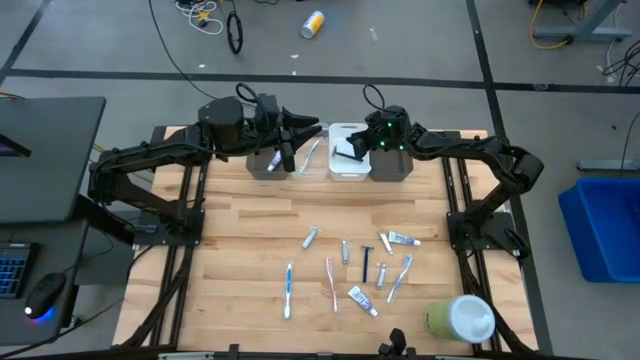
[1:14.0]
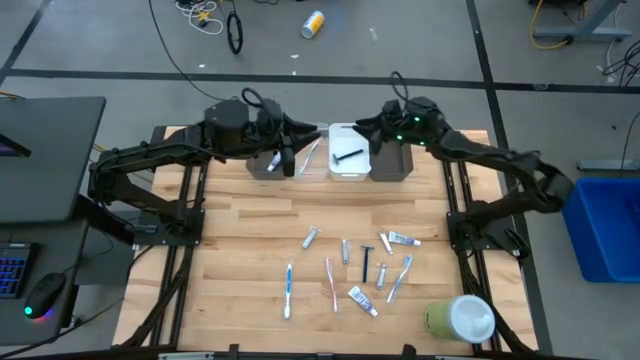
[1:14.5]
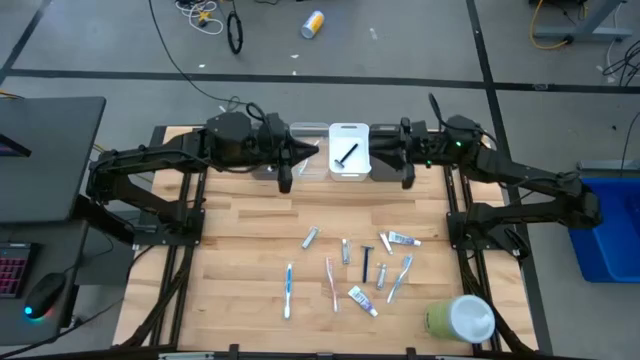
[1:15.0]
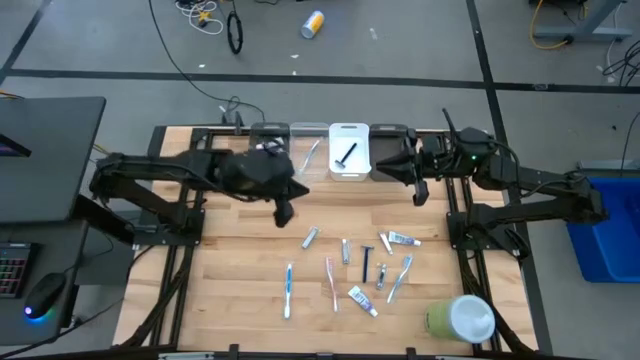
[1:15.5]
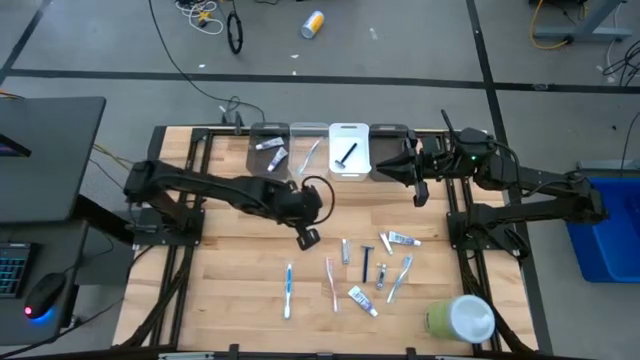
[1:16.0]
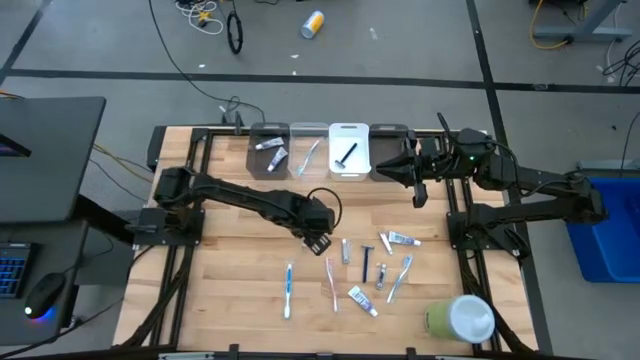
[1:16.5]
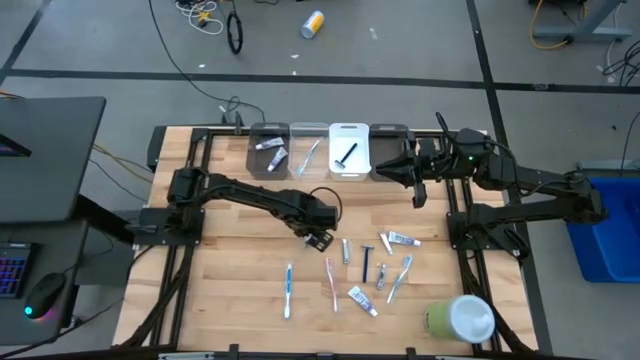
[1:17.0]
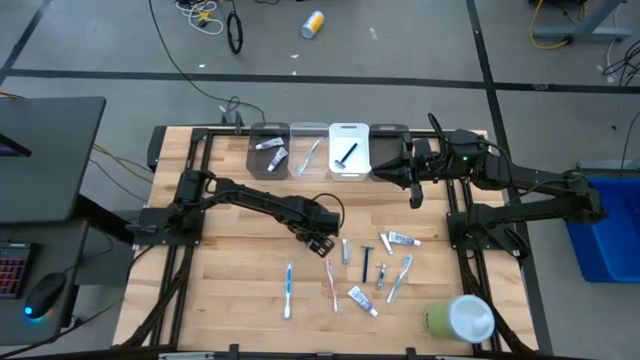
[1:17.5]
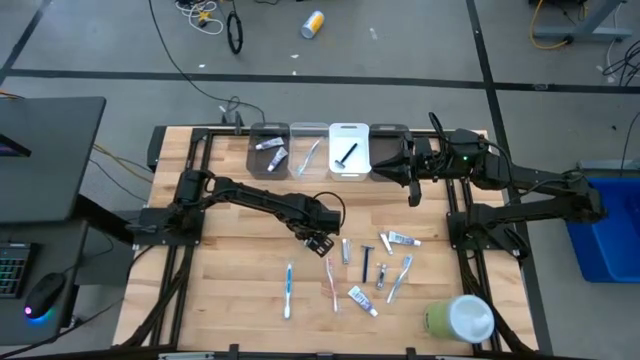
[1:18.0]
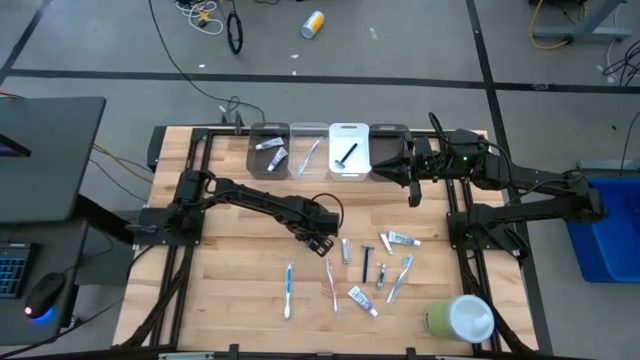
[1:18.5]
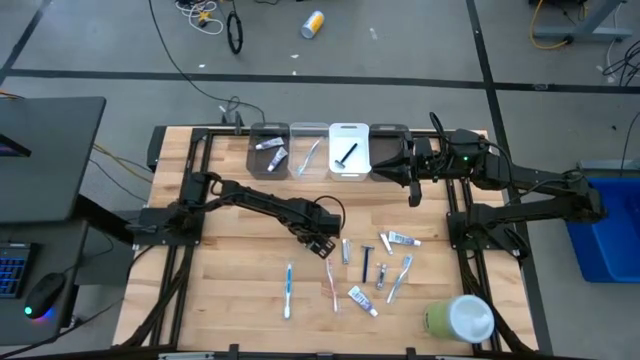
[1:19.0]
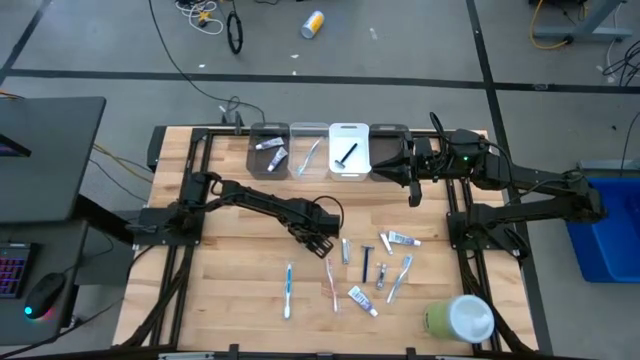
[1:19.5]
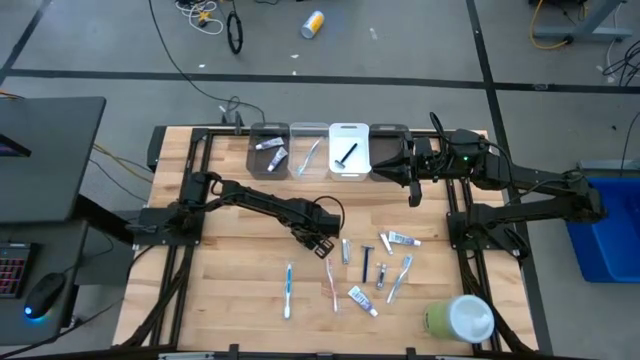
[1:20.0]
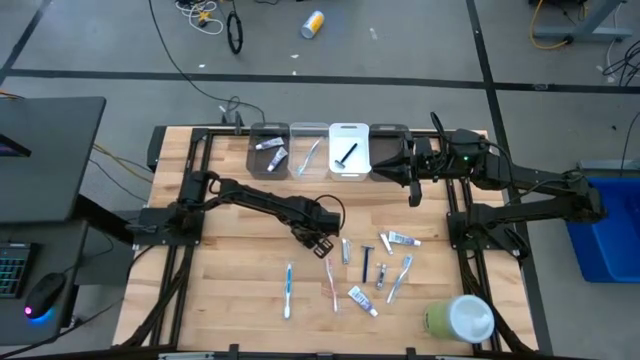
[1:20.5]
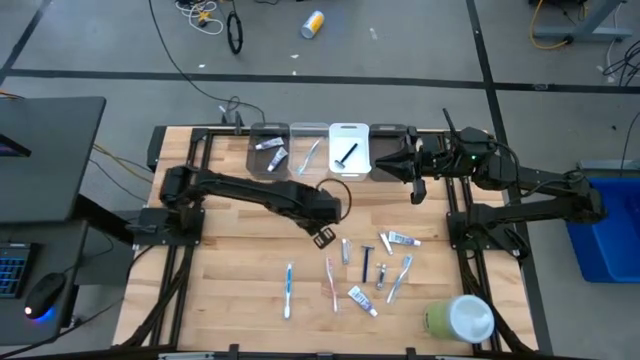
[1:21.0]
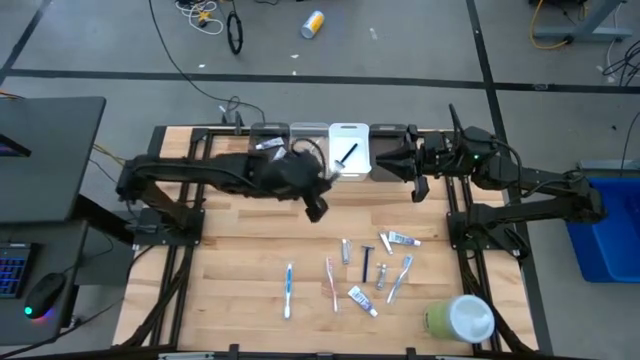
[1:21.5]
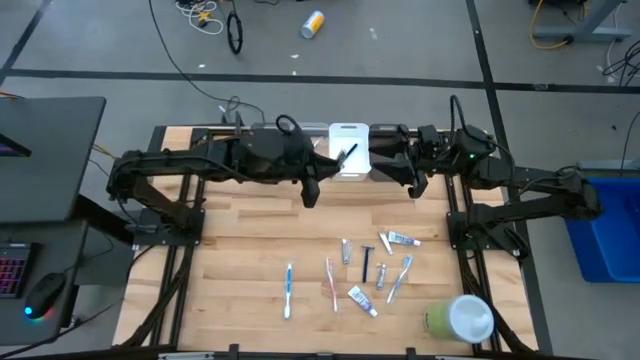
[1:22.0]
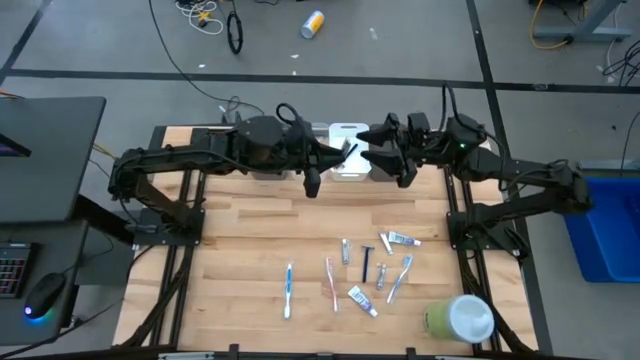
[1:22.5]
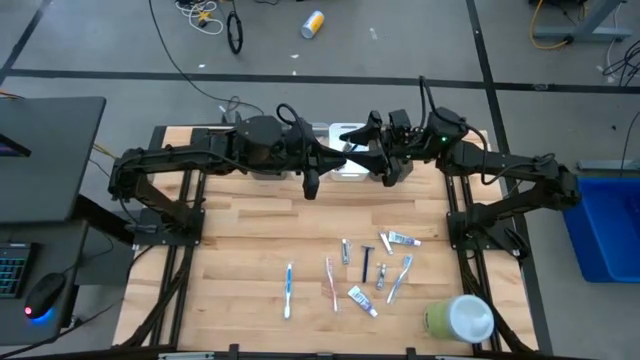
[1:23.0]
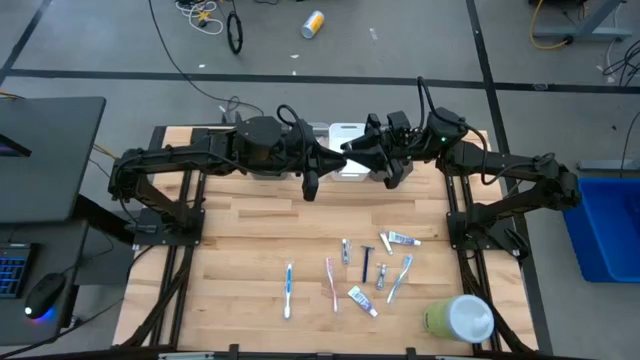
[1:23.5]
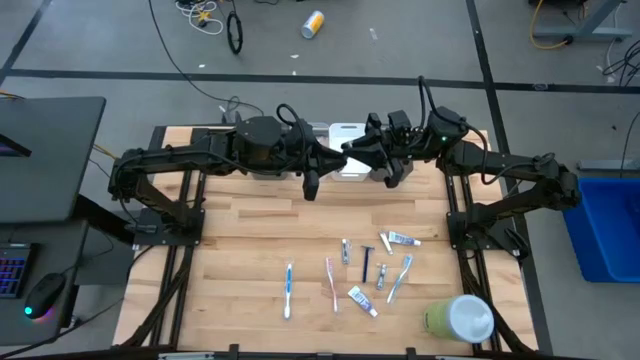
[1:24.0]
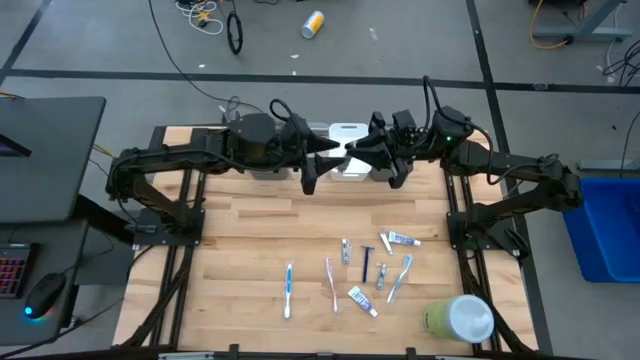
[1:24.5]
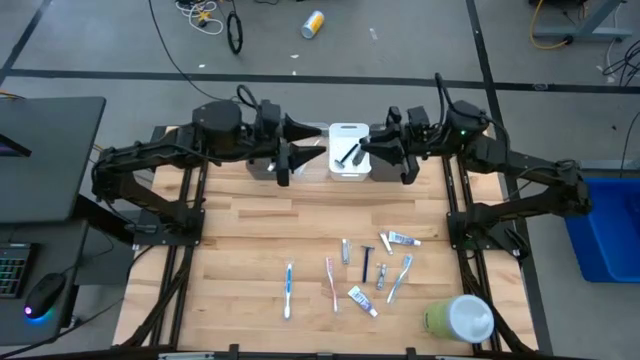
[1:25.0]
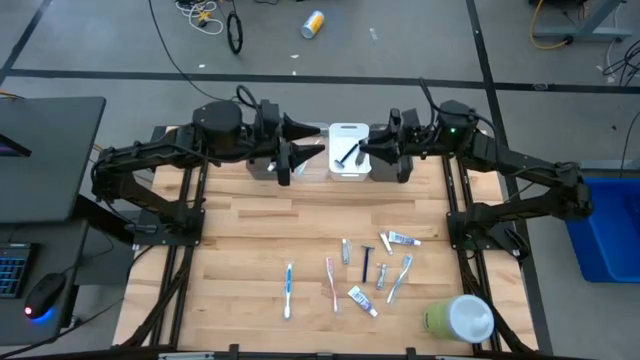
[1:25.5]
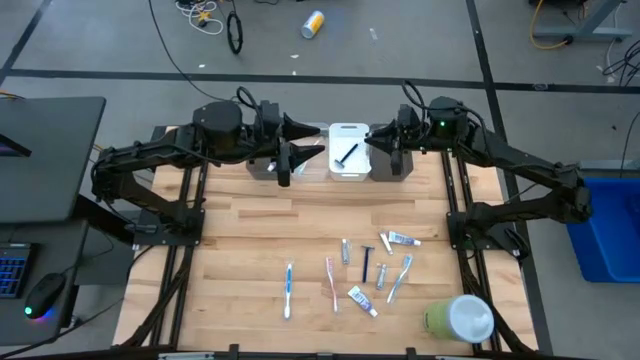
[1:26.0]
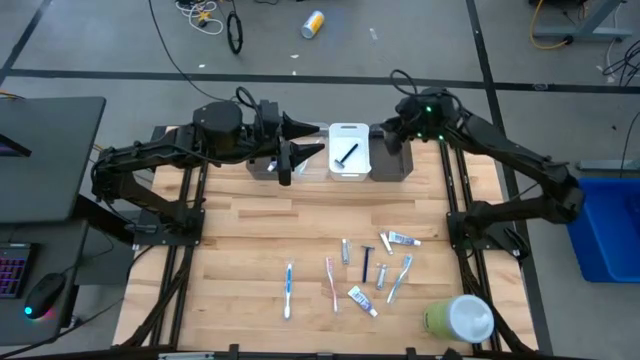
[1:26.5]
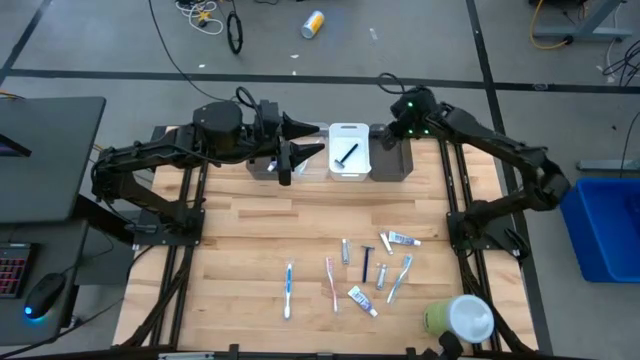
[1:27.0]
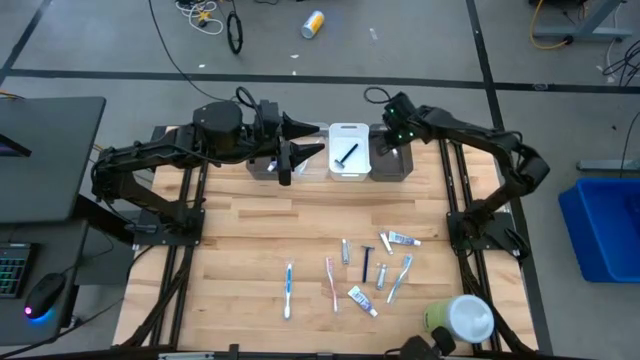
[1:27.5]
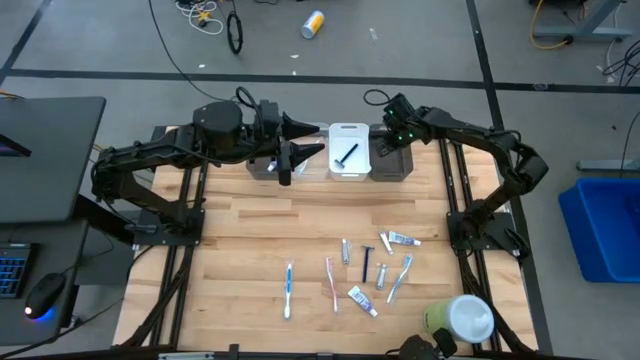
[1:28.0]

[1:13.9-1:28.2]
Task: Pick & Place Travel size toiletries
Put the silver nail cutter into the white bin
